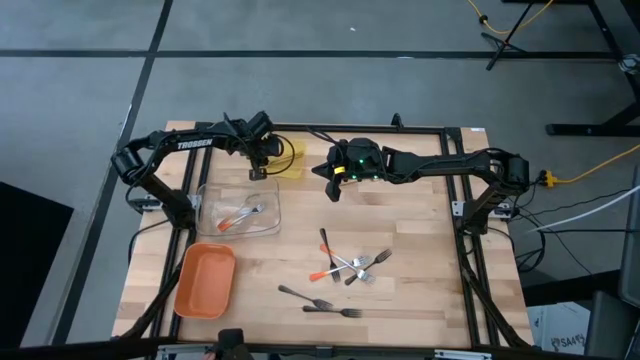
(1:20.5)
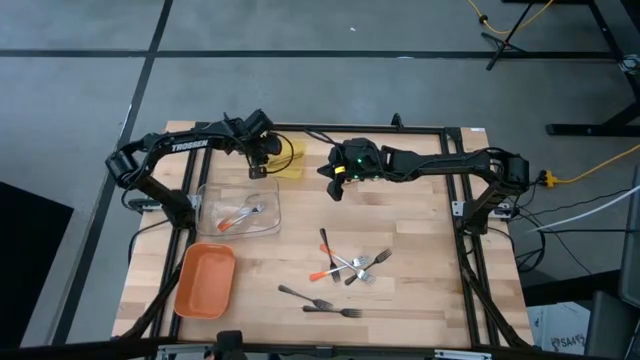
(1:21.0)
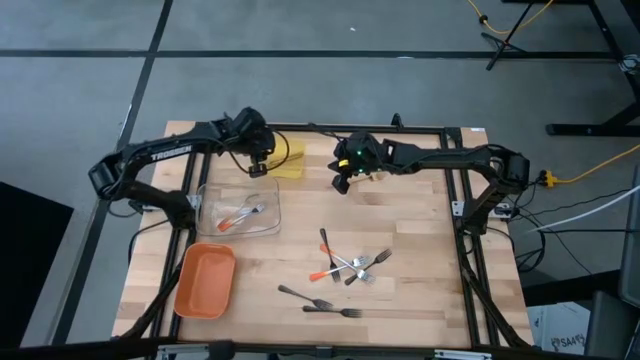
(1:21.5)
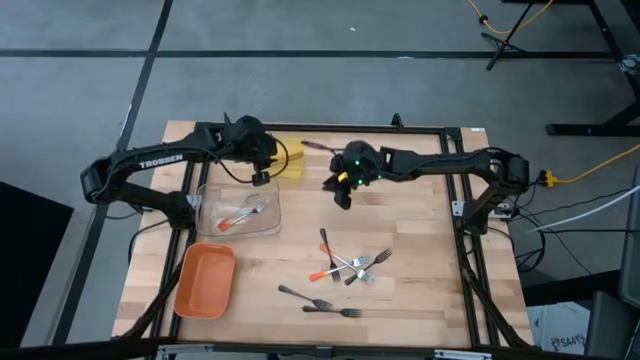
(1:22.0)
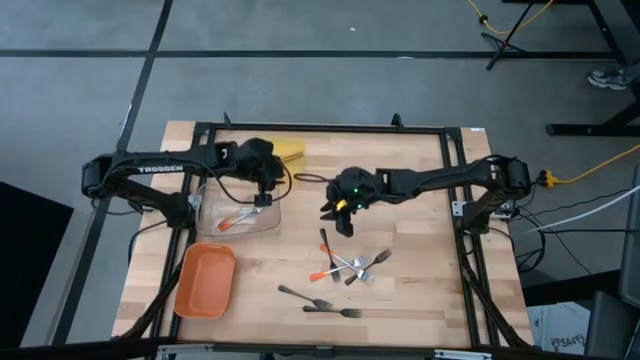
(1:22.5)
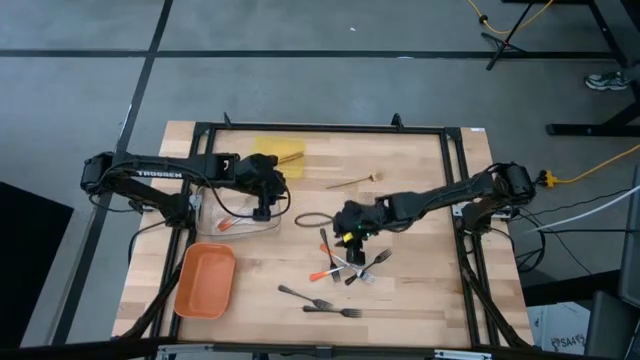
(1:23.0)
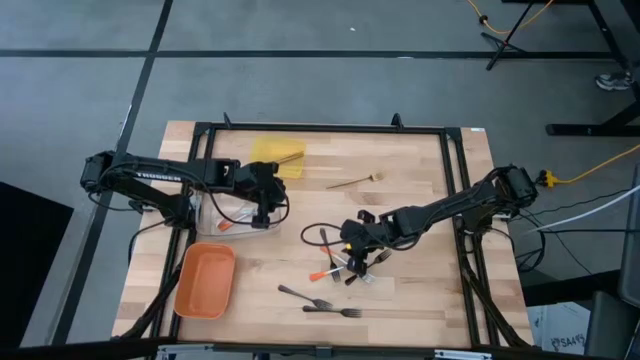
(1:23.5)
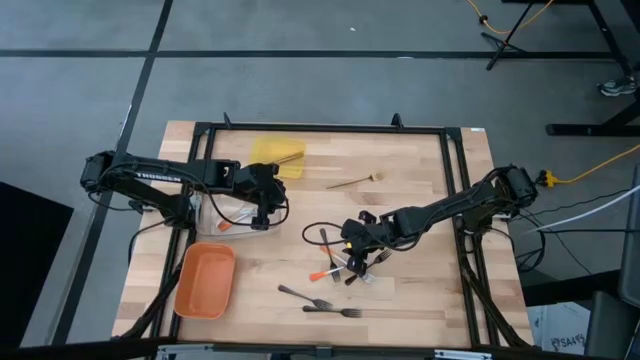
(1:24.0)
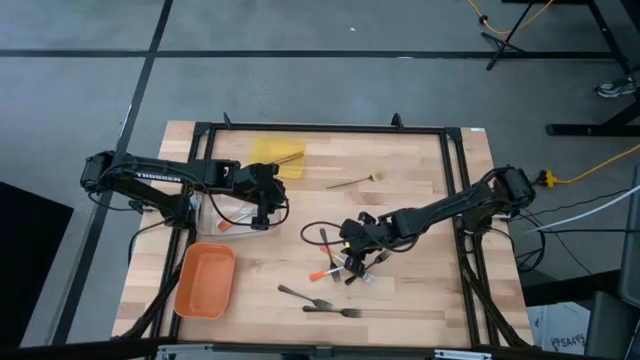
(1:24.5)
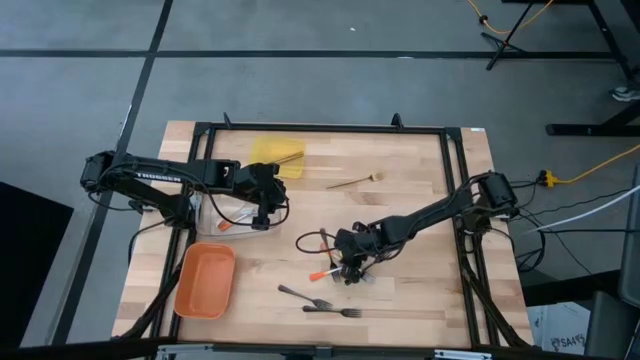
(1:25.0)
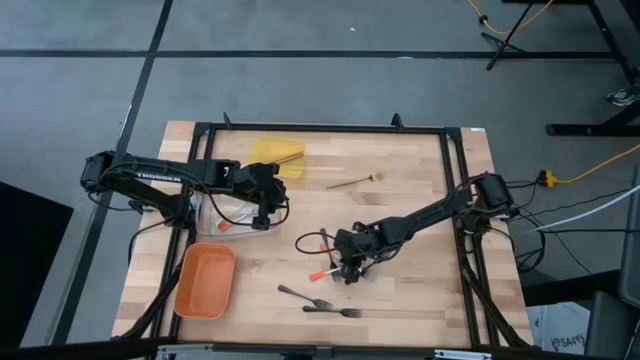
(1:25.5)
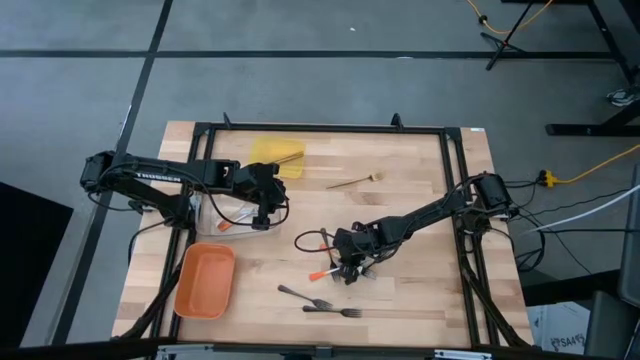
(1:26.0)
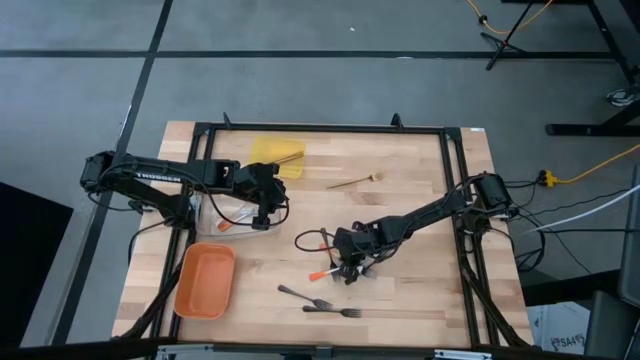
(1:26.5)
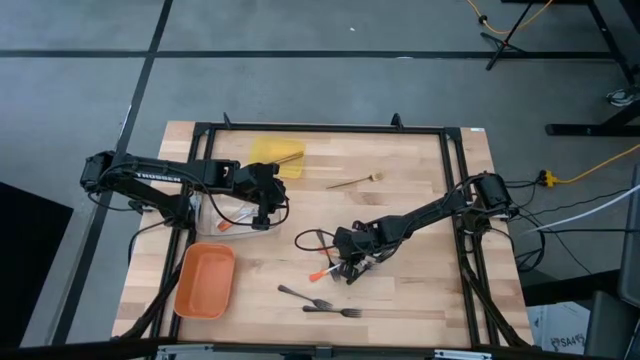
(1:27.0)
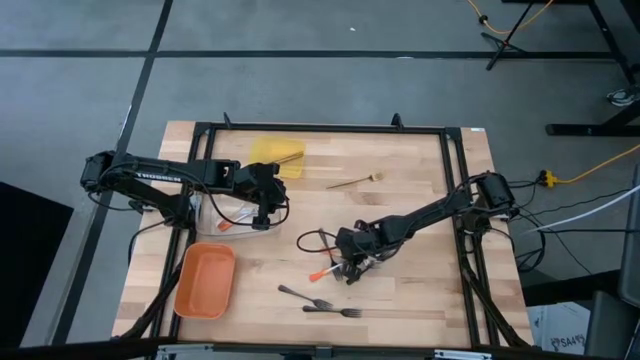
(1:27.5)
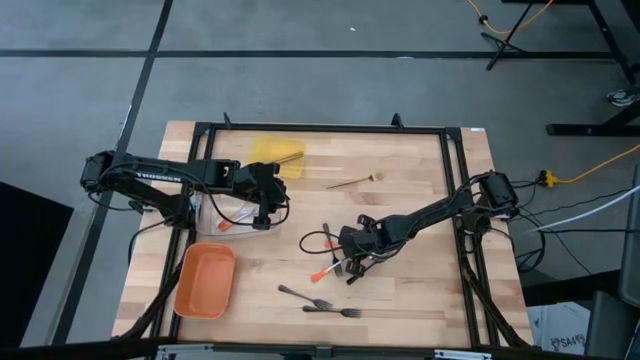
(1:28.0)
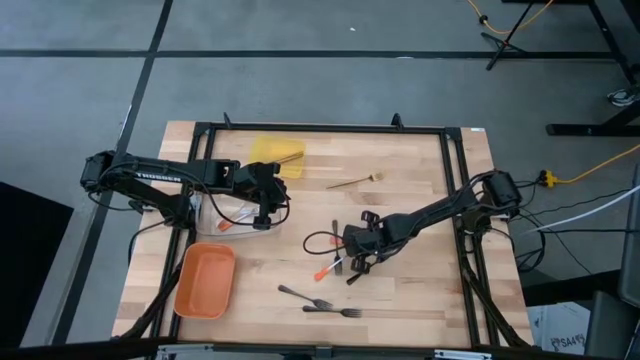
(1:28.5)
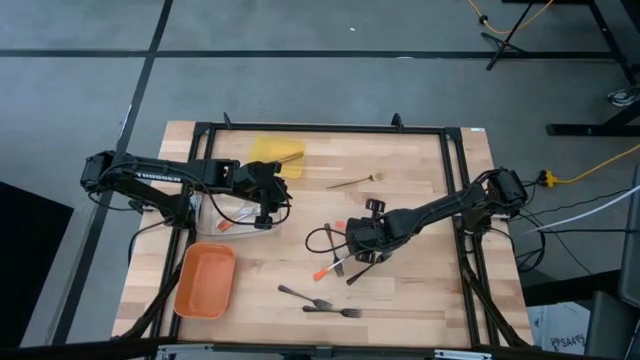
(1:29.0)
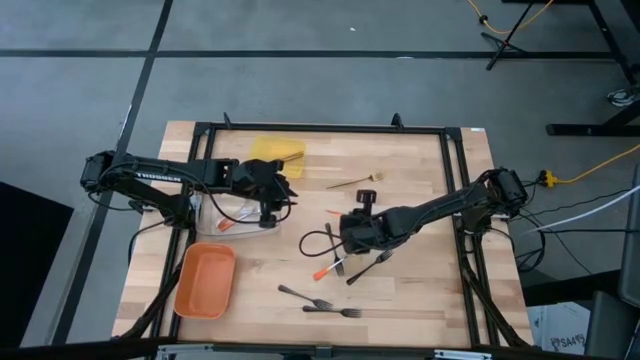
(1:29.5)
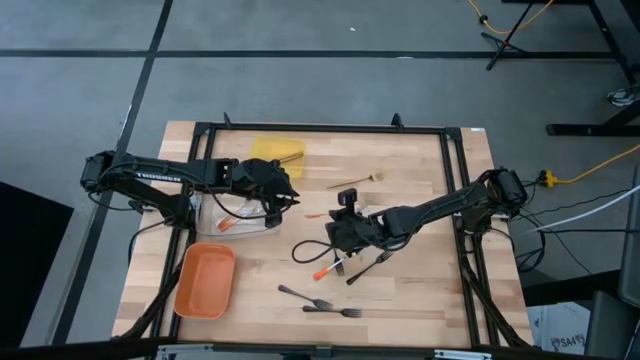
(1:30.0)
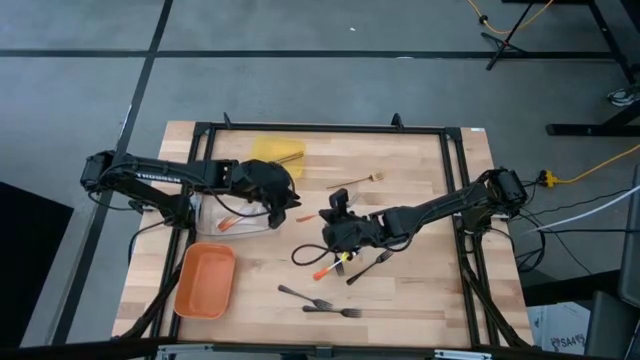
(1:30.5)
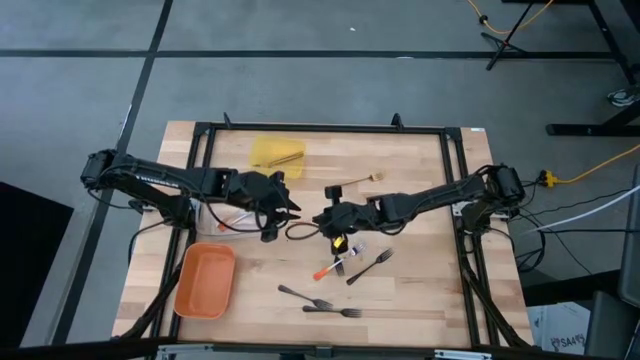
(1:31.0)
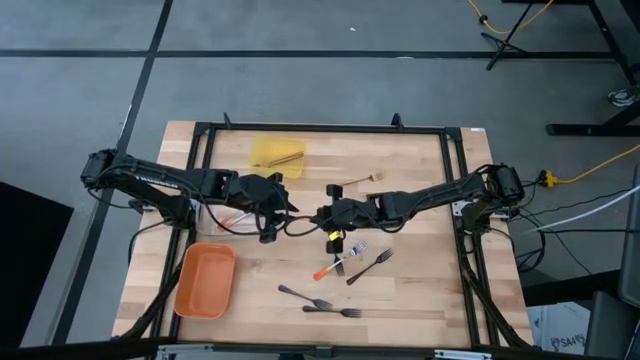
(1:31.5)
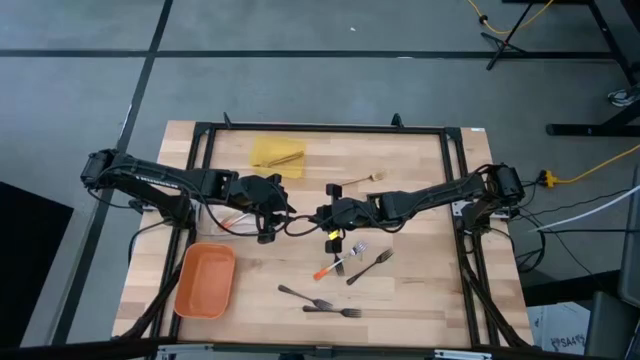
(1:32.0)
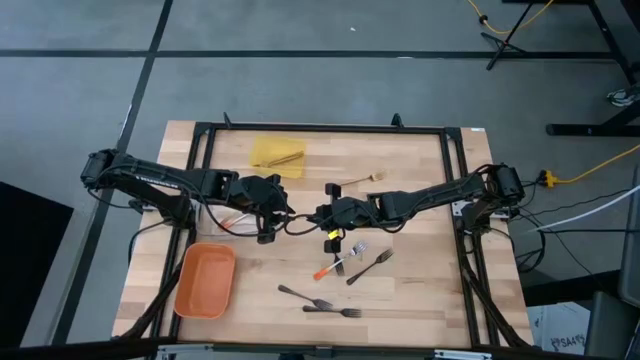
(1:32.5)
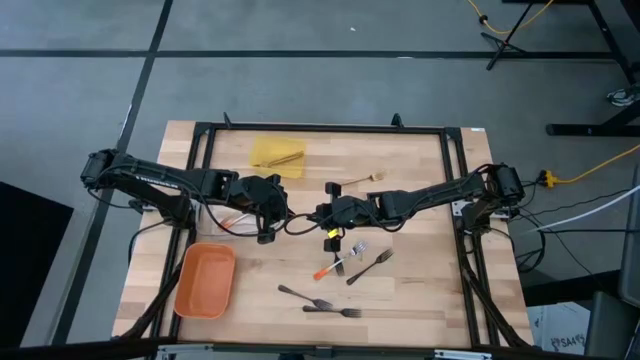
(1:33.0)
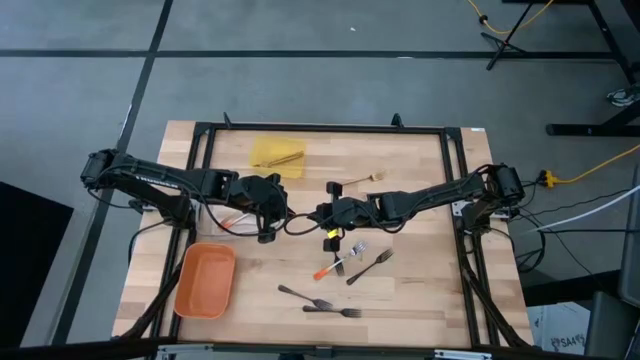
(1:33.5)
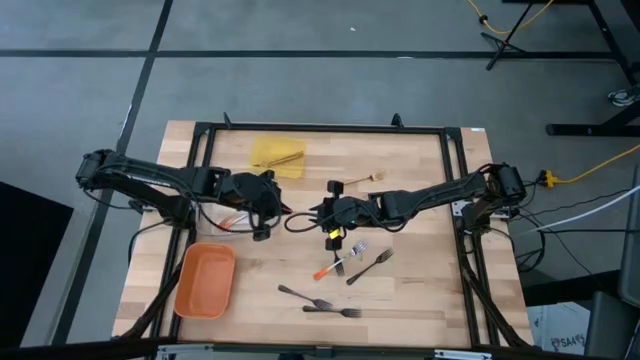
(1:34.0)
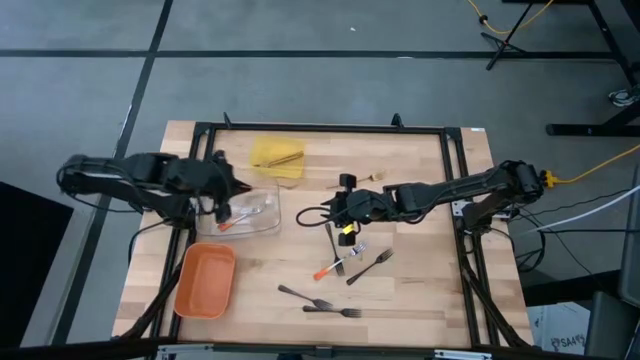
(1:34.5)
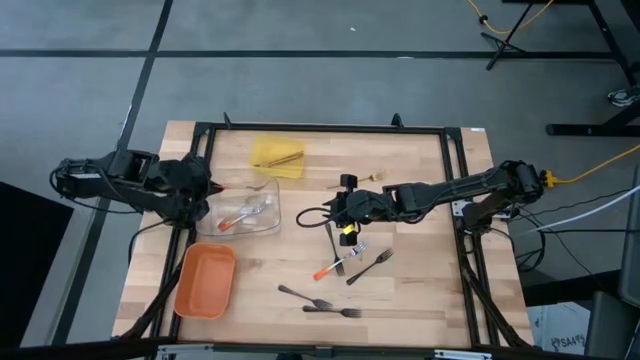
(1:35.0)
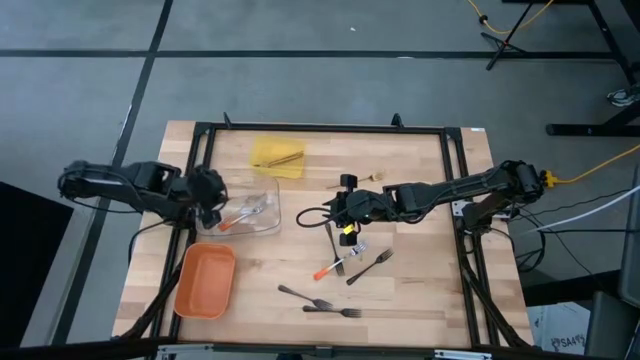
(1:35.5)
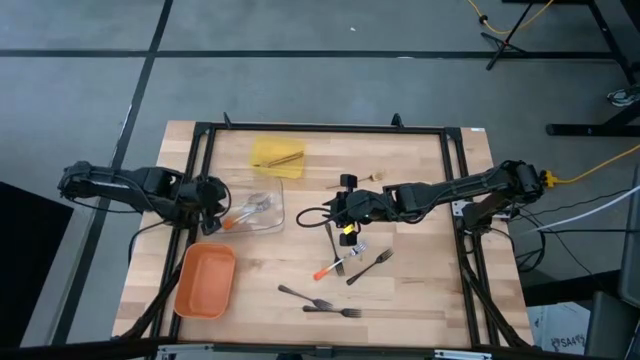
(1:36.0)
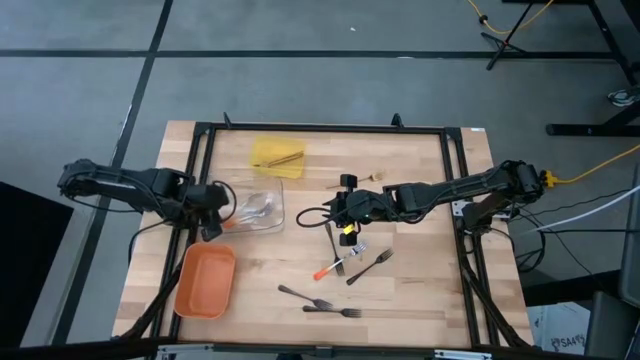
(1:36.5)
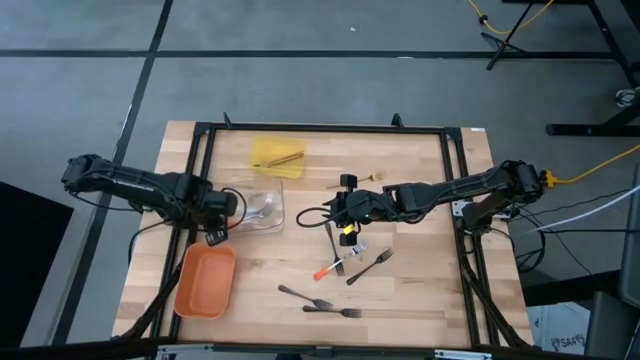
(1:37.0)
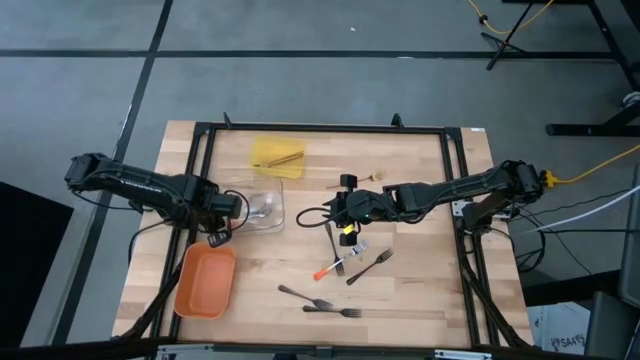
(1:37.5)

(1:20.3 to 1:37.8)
Task: Sort silverware by color (type)
Put the orange fork into the transparent bin

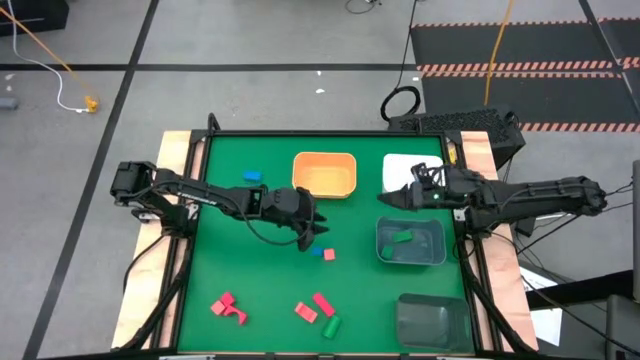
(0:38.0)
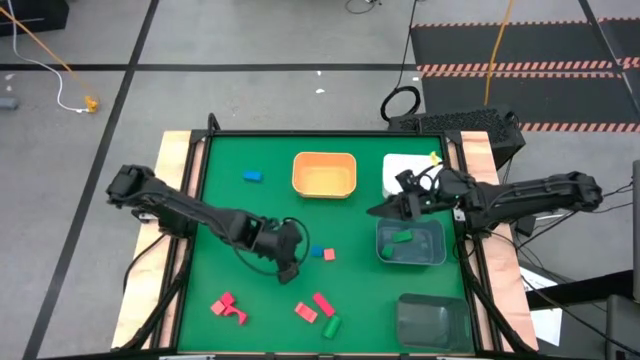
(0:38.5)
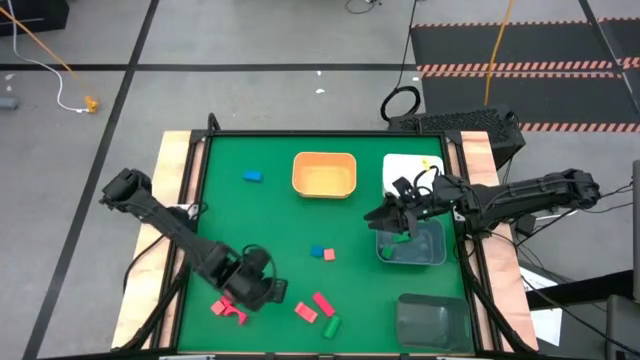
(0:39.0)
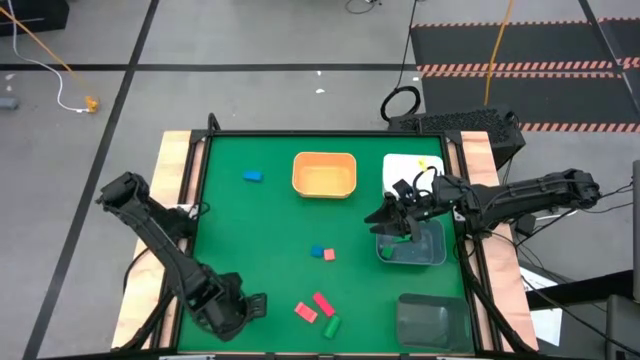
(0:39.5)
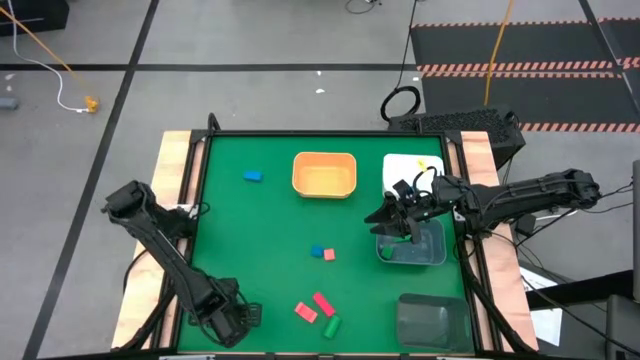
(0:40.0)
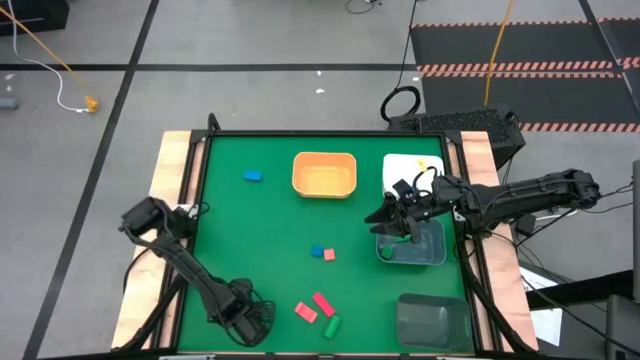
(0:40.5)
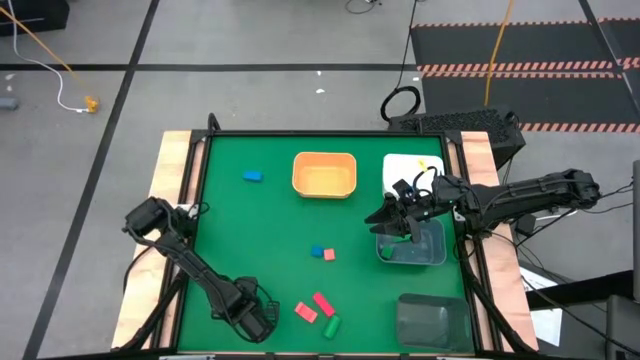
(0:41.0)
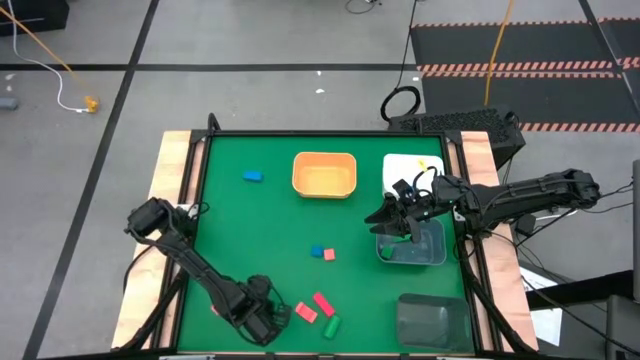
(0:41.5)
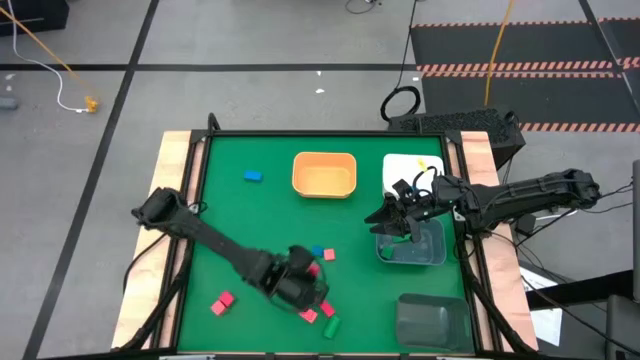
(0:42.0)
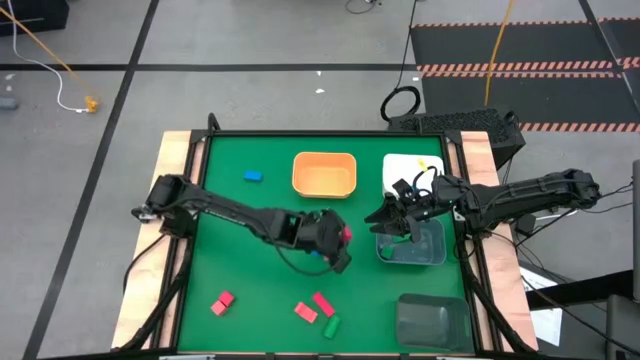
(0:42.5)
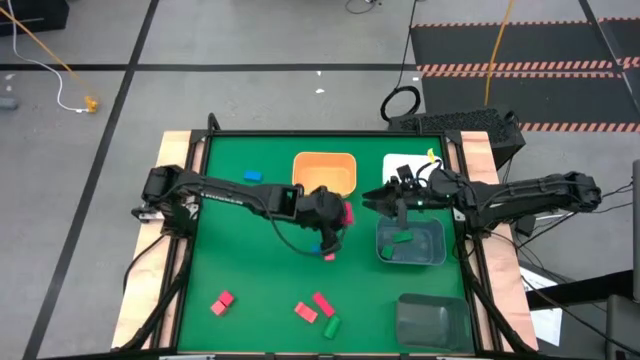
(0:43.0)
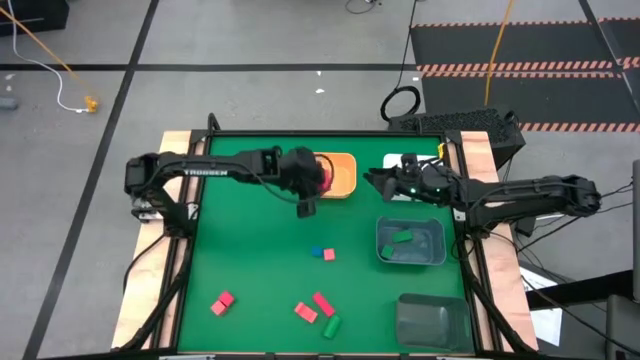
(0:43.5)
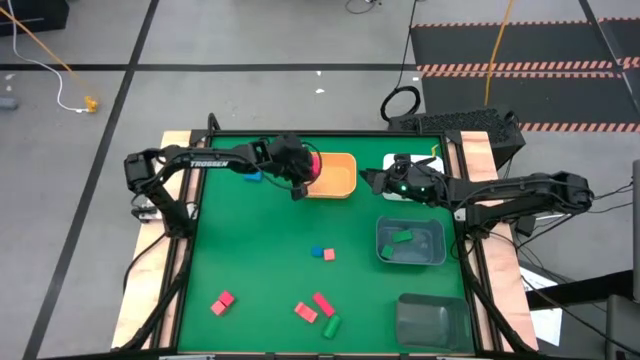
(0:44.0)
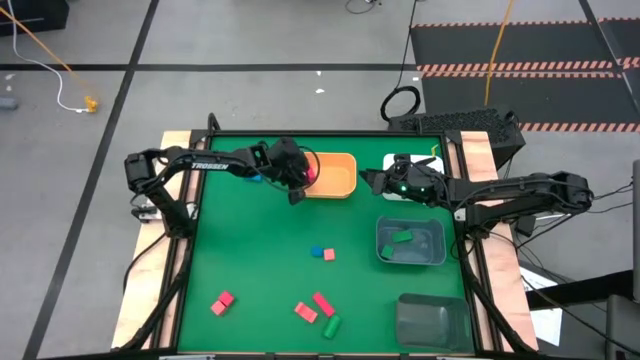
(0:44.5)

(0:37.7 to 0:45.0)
Task: Sort & place blocks by color
Put the left red block into the yellow bin
